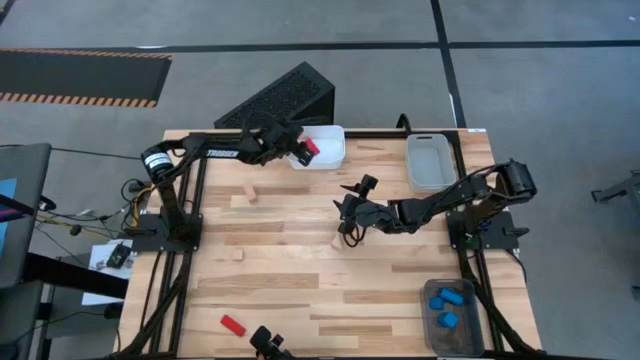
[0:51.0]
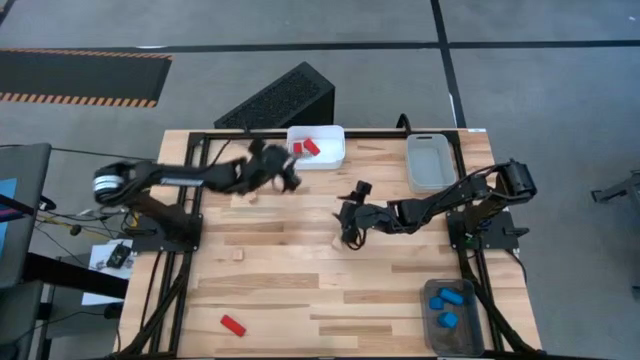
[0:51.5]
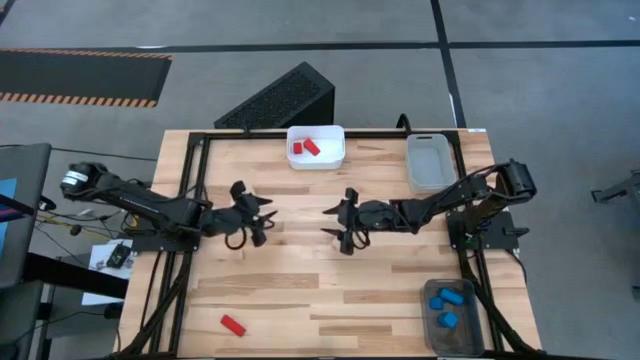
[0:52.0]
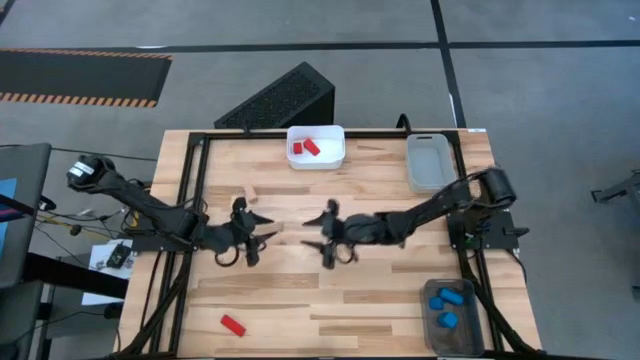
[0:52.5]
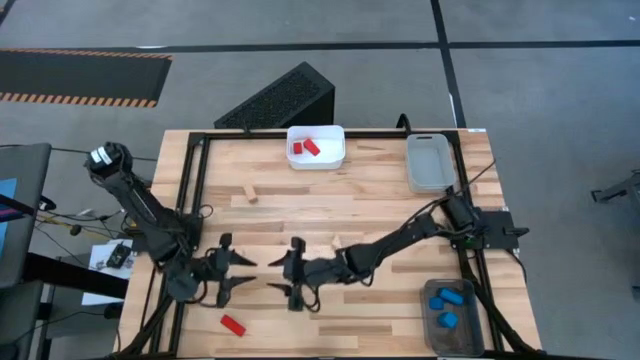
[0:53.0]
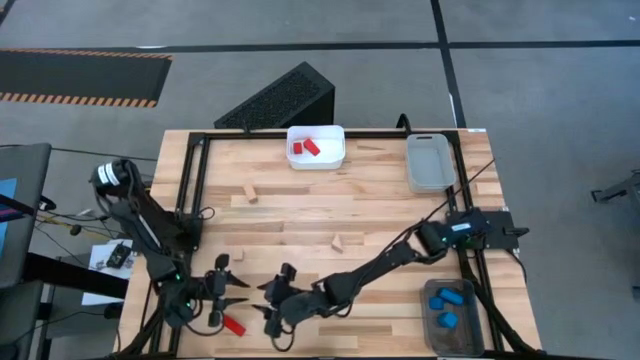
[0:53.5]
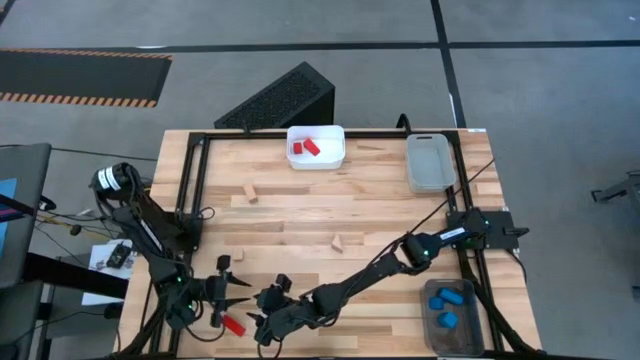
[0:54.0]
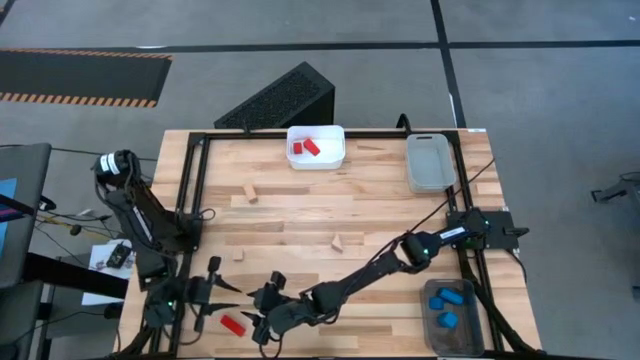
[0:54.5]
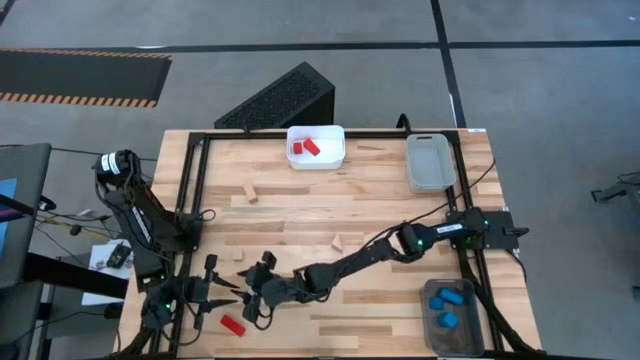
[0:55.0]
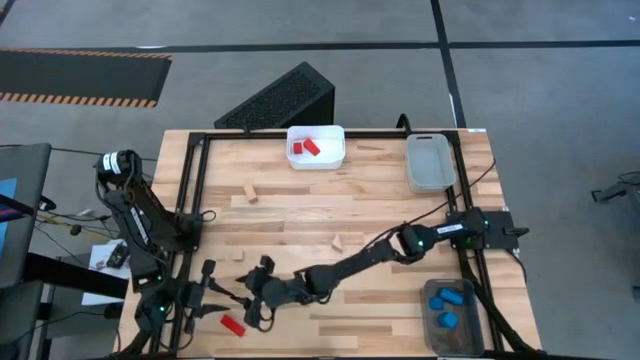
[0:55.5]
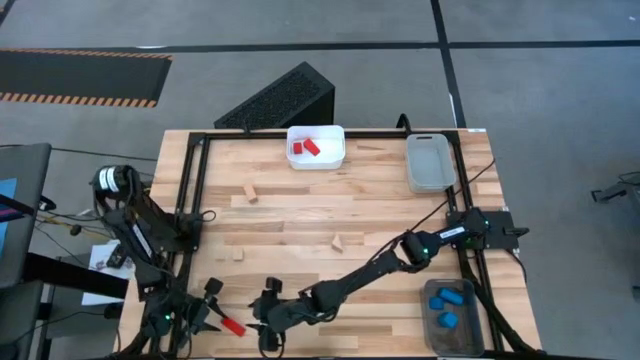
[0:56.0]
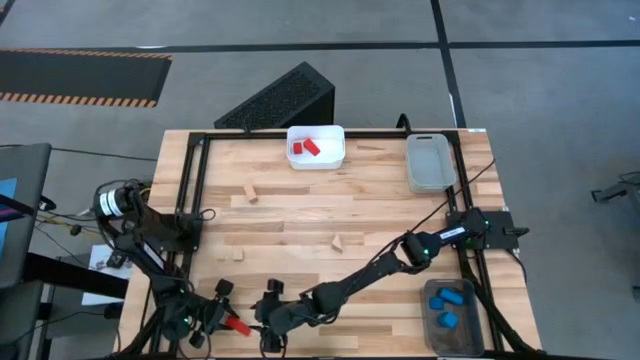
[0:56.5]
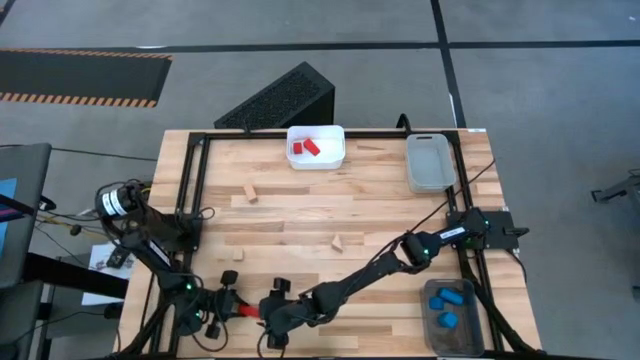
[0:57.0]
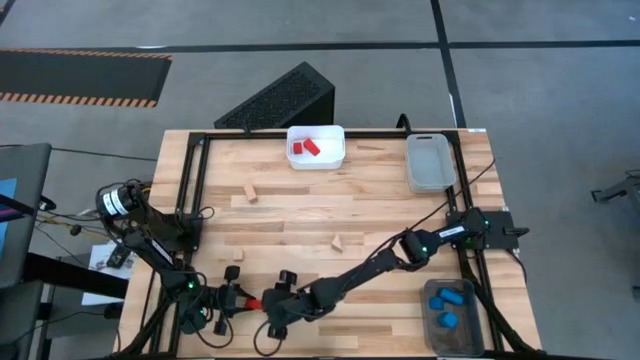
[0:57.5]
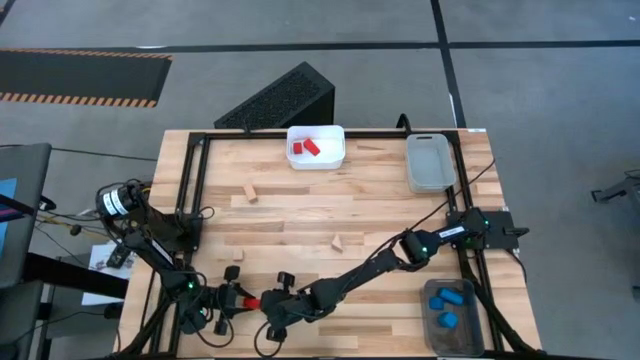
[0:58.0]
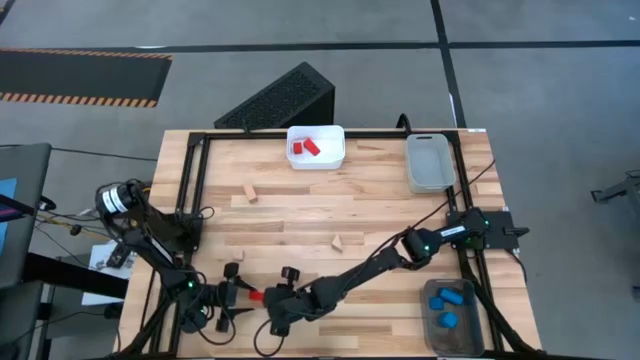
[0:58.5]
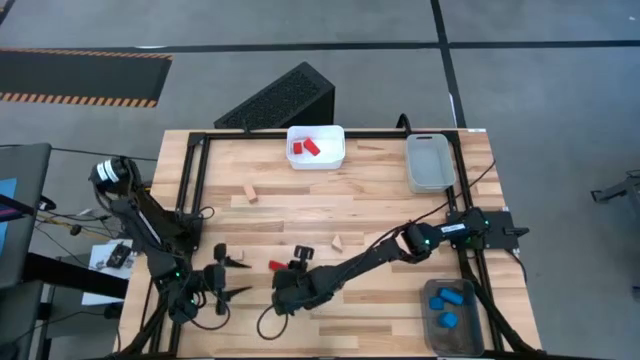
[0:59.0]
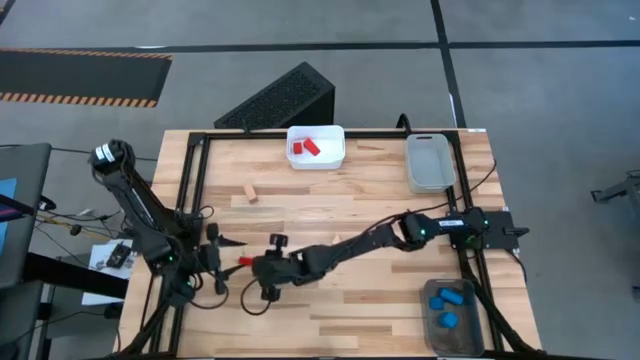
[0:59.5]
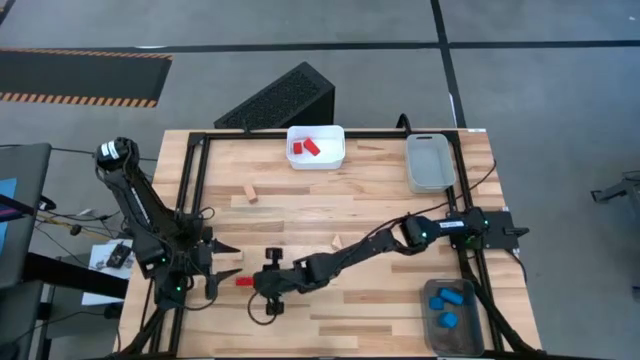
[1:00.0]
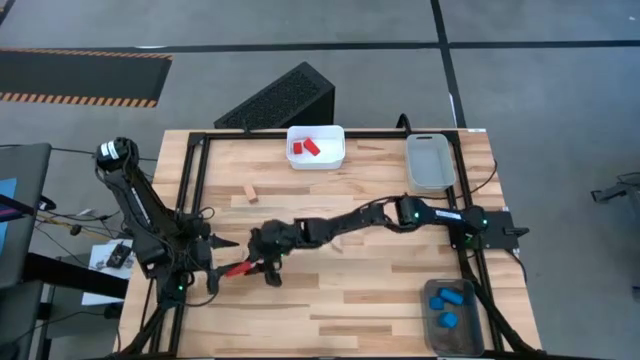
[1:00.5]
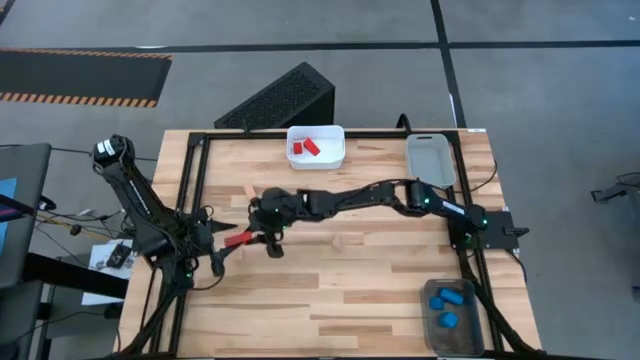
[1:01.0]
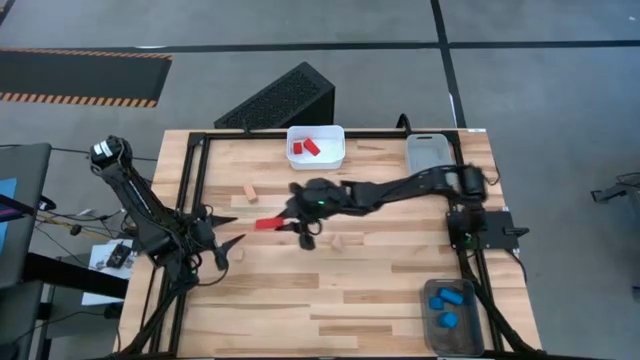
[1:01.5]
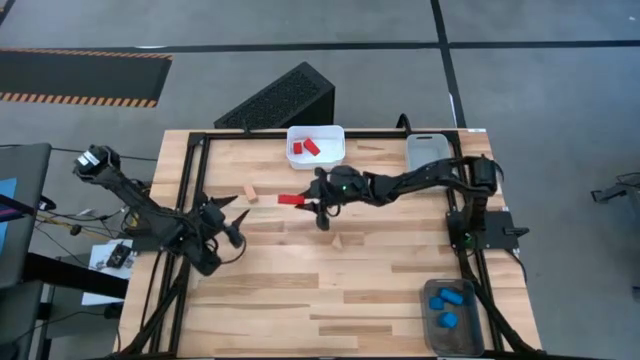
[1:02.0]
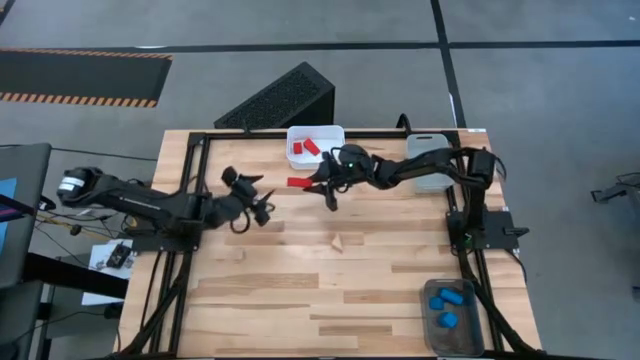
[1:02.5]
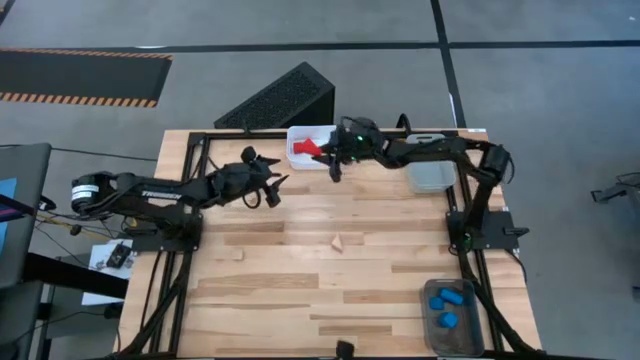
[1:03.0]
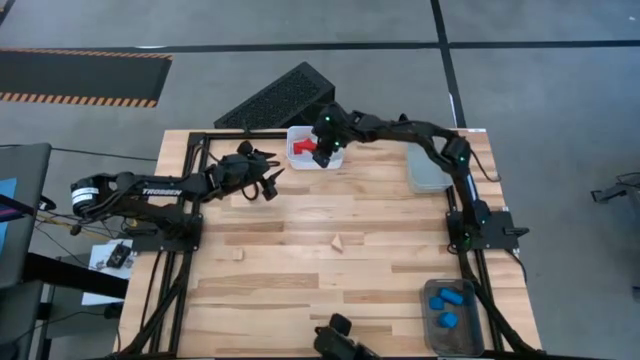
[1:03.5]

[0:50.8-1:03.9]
Task: Sort & place blocks by color
Put the red block into the white bin

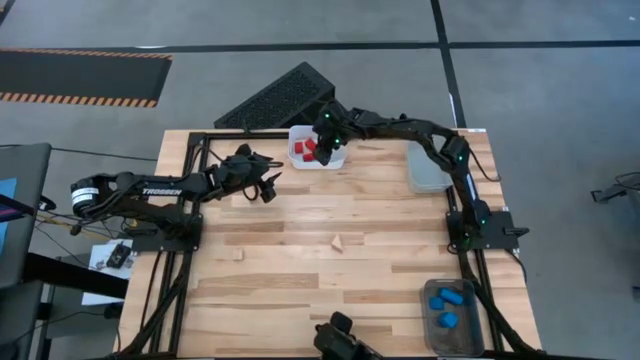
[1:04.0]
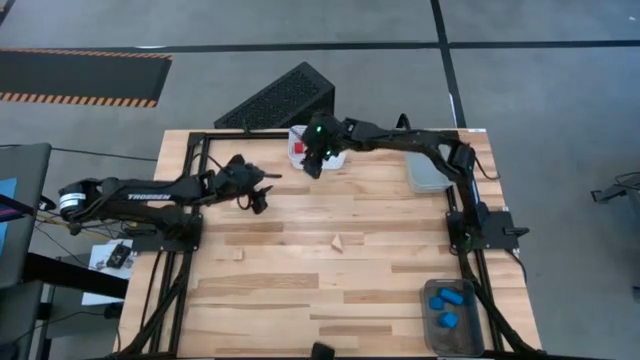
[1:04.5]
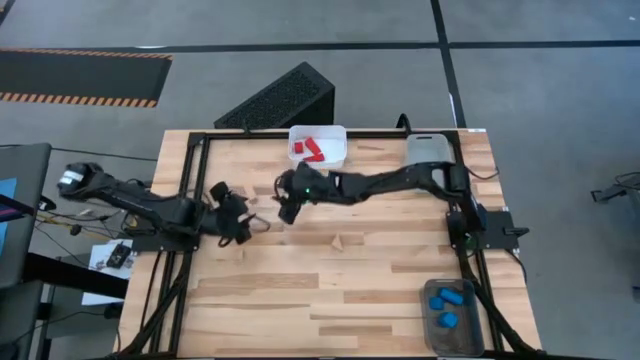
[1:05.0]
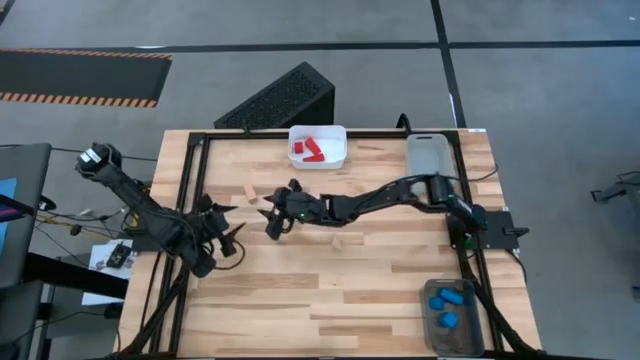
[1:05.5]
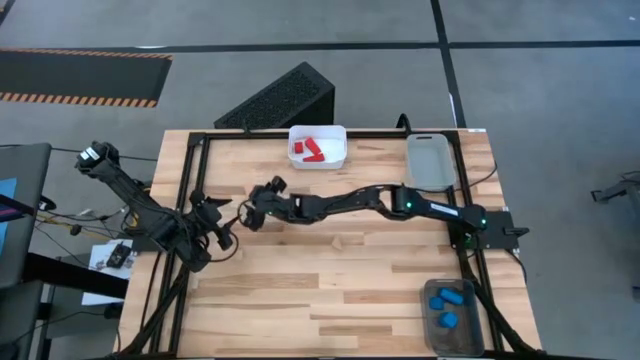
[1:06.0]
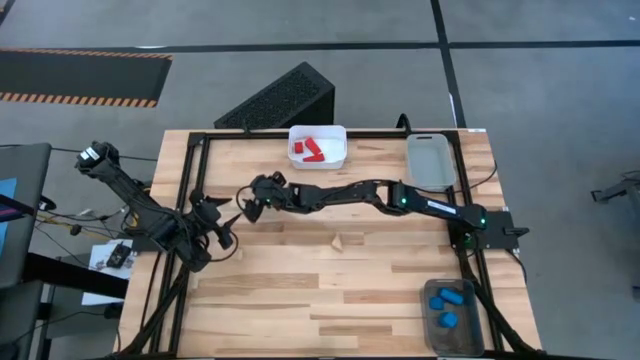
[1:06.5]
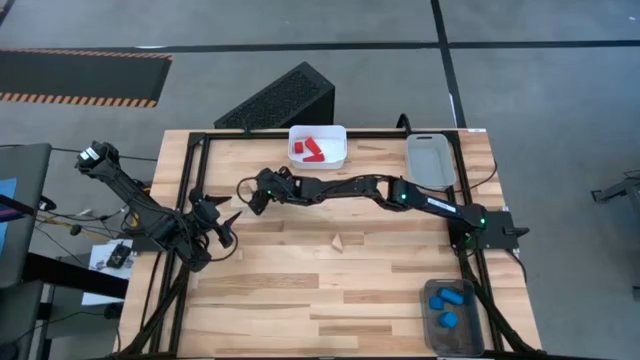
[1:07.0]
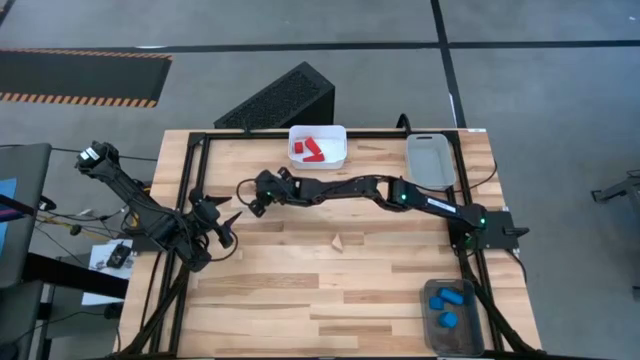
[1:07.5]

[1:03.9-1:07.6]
Put the top left brown block into the gray bin

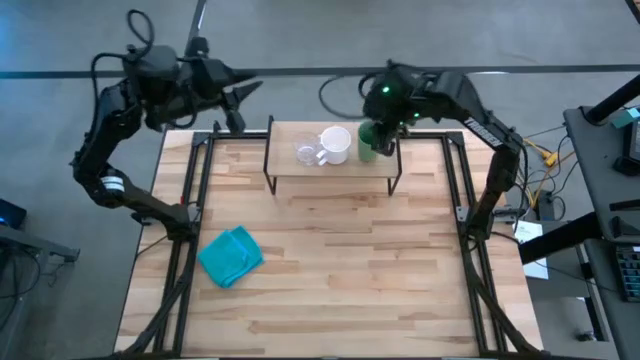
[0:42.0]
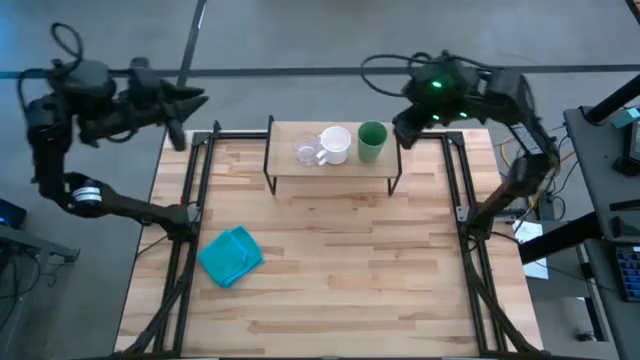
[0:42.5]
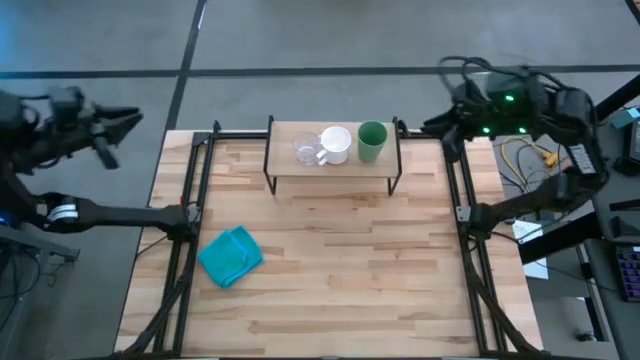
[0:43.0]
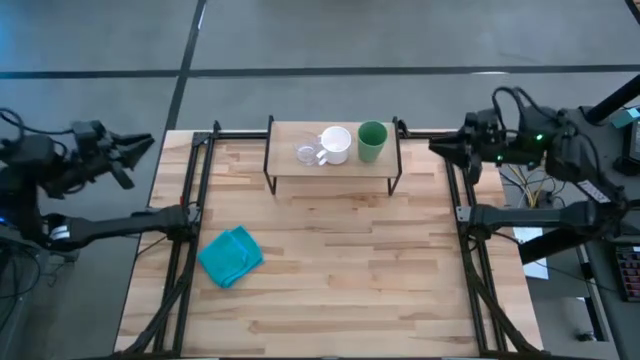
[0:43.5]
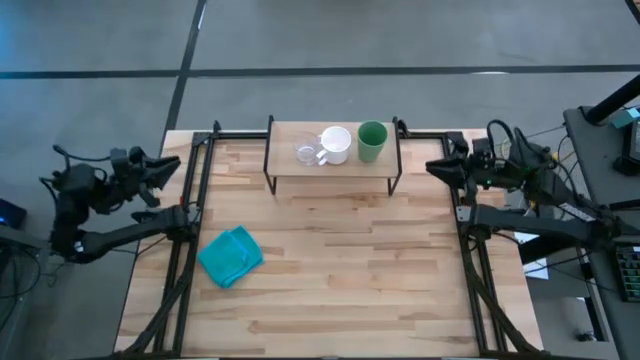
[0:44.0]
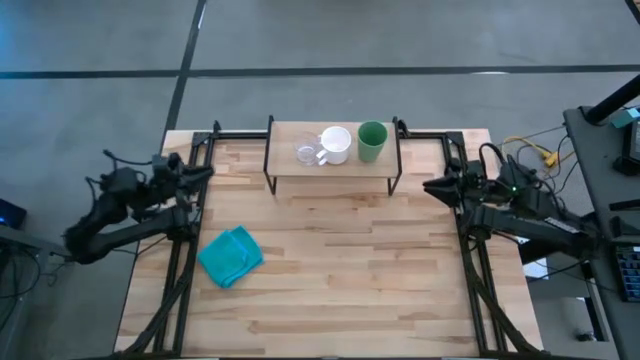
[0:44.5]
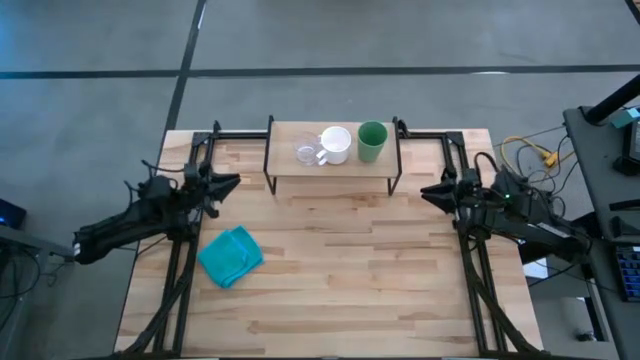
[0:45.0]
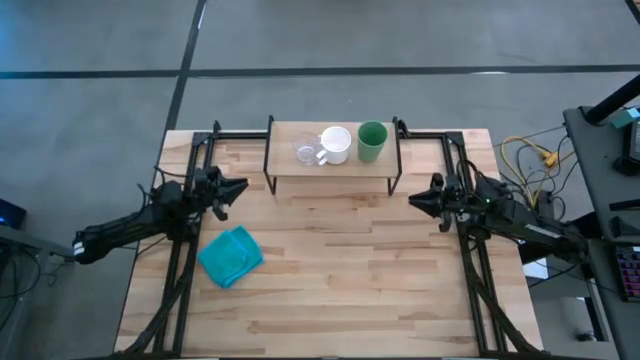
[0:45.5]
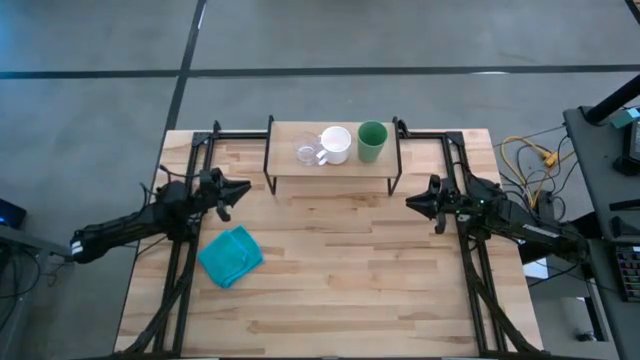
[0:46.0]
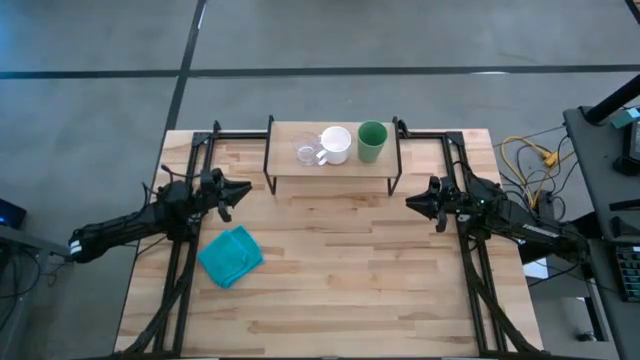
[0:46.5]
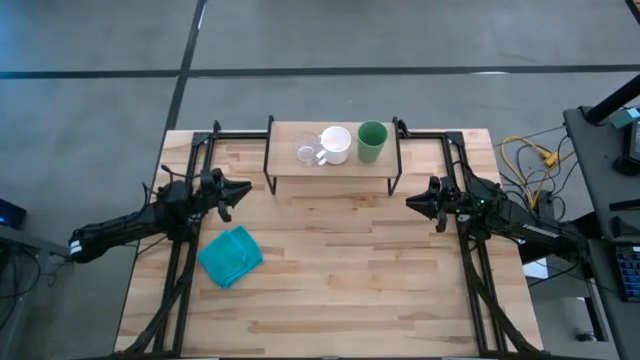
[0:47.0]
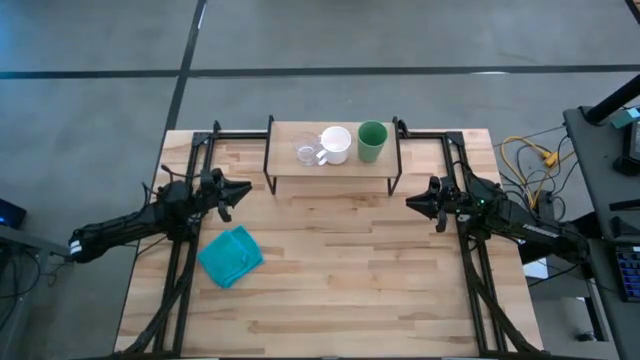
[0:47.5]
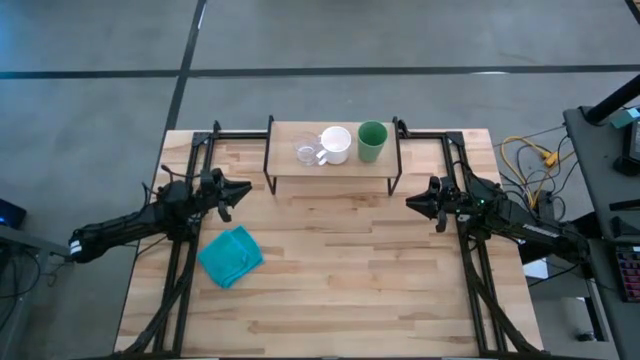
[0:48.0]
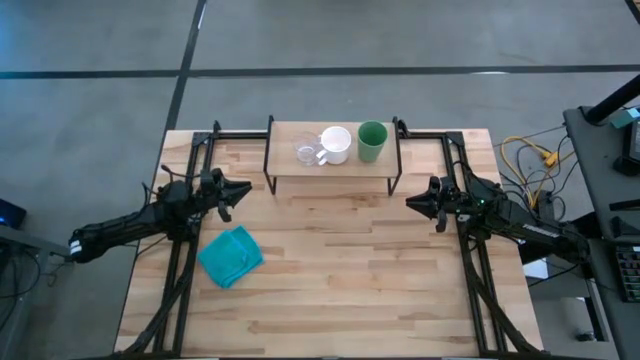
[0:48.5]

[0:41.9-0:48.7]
Task: Stack small to large cups/mugs on shelf
Return to Home Position
